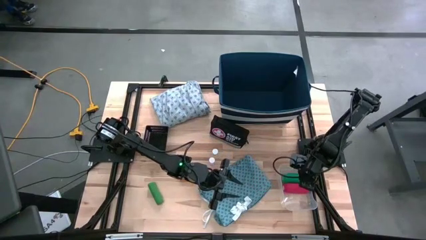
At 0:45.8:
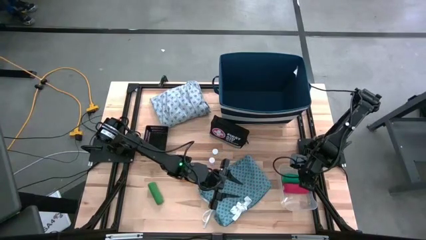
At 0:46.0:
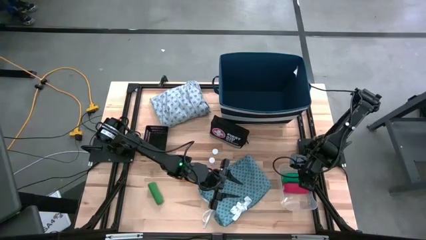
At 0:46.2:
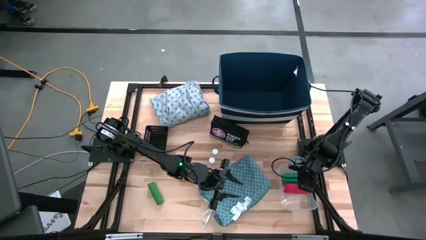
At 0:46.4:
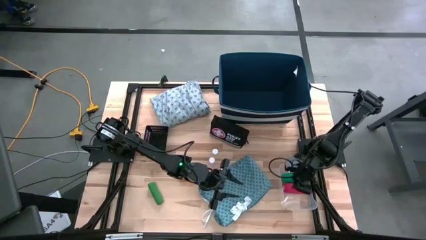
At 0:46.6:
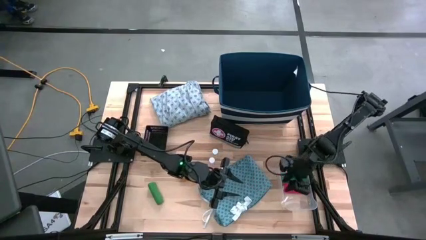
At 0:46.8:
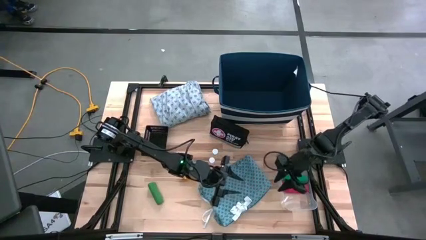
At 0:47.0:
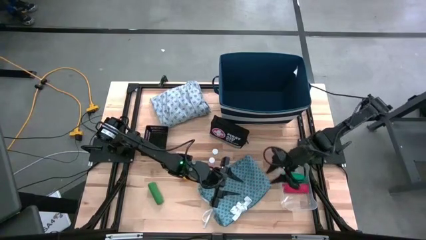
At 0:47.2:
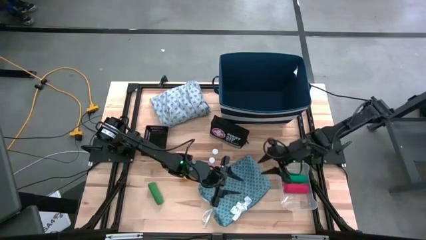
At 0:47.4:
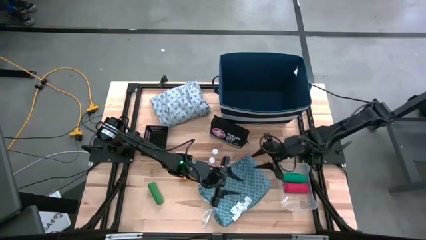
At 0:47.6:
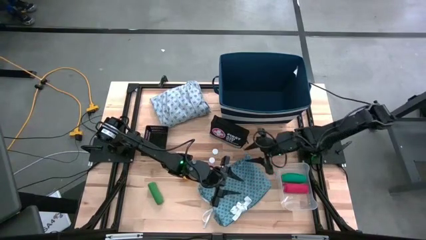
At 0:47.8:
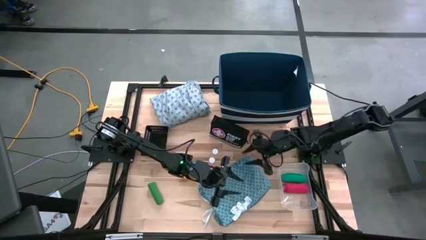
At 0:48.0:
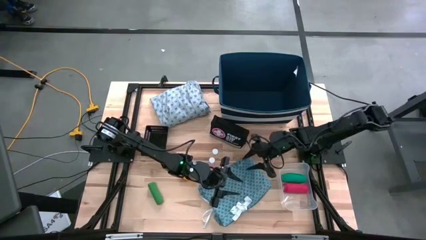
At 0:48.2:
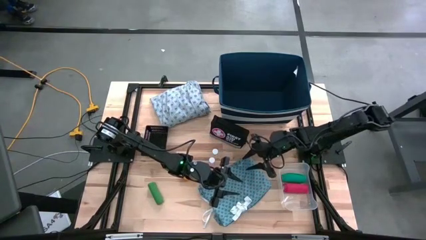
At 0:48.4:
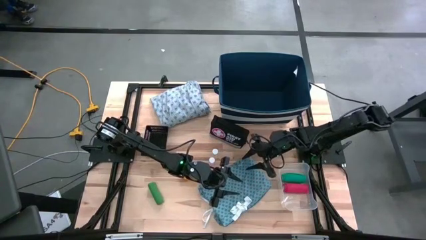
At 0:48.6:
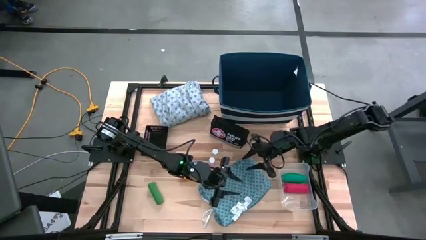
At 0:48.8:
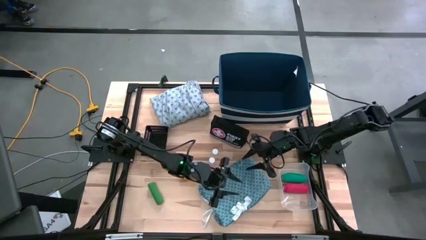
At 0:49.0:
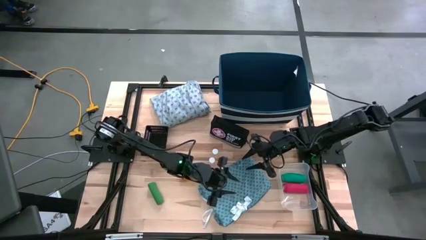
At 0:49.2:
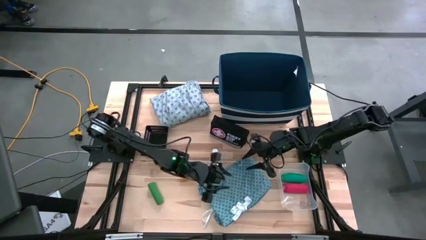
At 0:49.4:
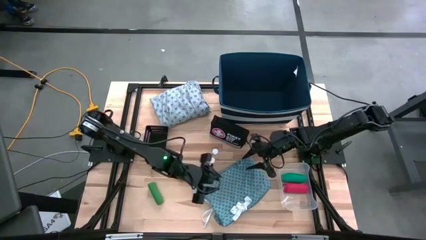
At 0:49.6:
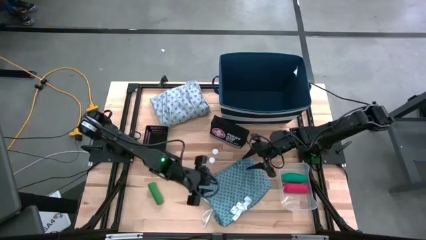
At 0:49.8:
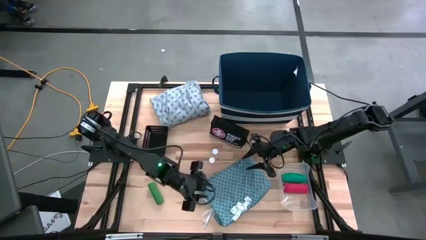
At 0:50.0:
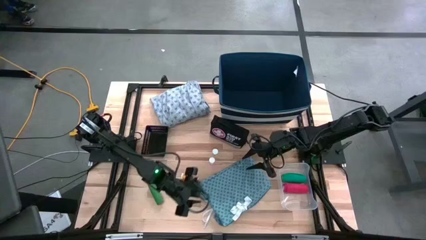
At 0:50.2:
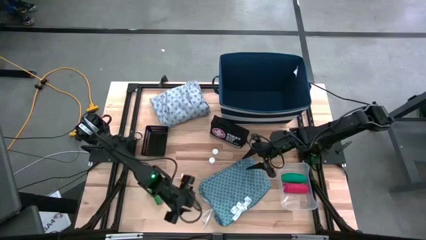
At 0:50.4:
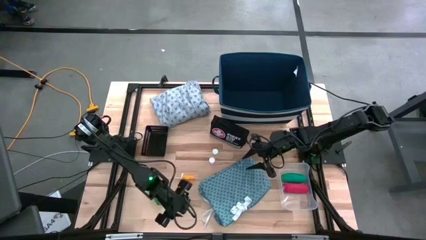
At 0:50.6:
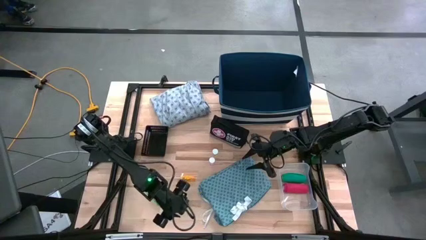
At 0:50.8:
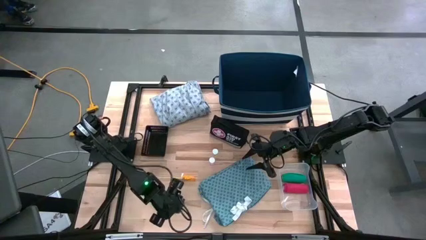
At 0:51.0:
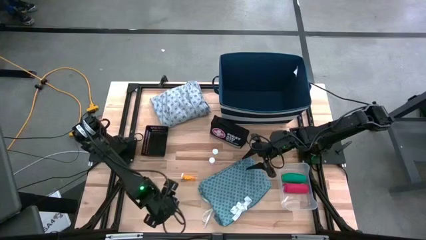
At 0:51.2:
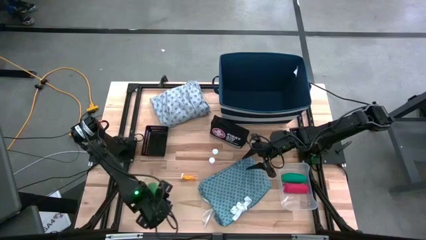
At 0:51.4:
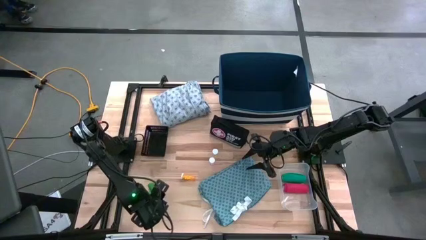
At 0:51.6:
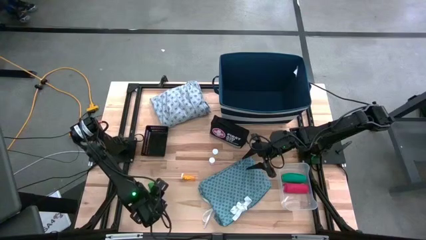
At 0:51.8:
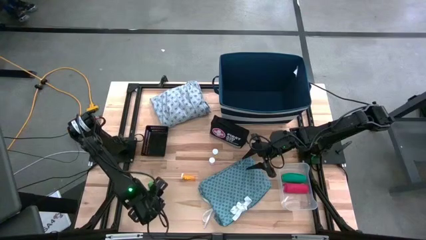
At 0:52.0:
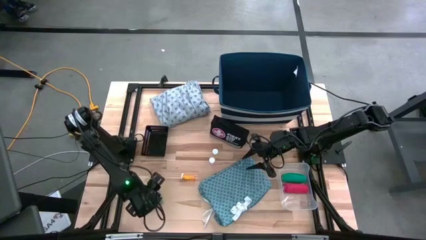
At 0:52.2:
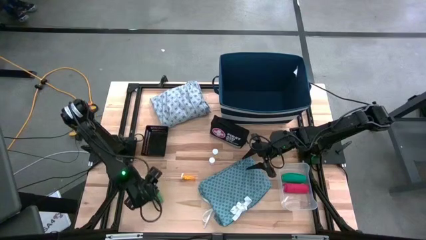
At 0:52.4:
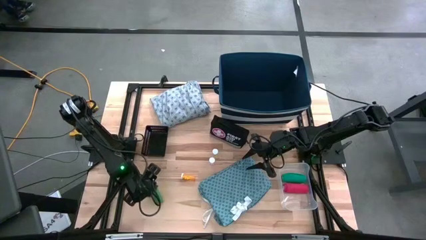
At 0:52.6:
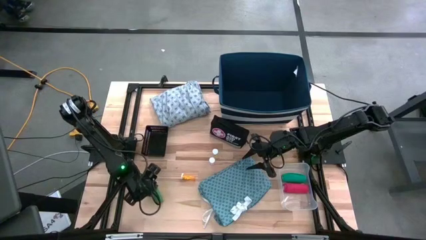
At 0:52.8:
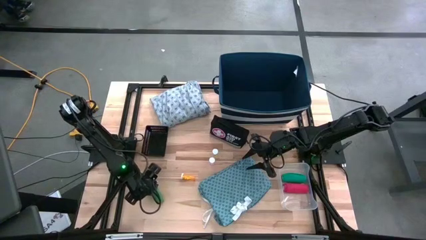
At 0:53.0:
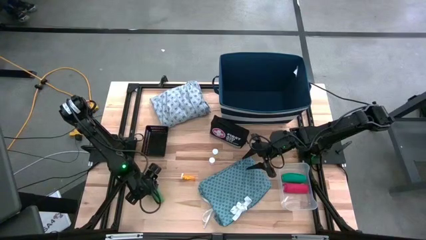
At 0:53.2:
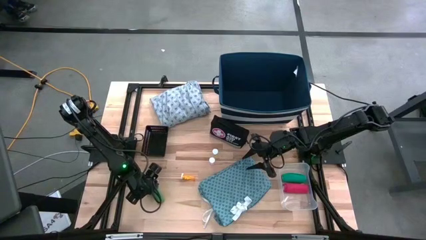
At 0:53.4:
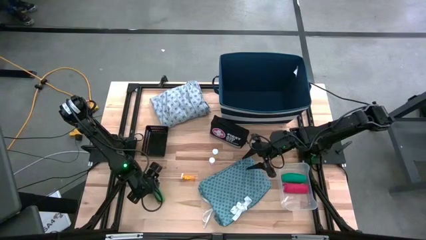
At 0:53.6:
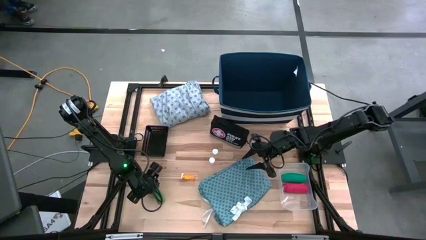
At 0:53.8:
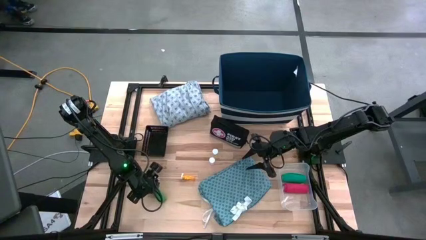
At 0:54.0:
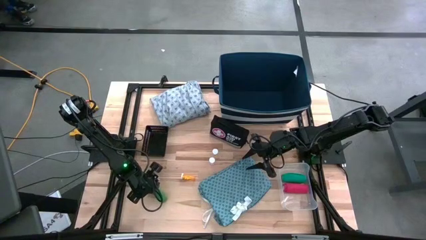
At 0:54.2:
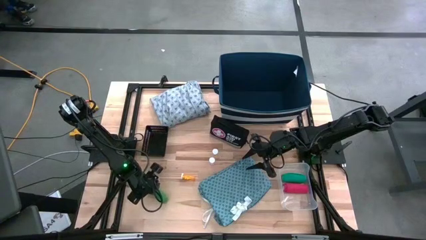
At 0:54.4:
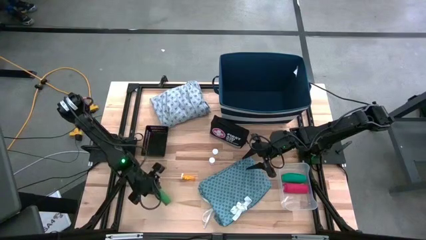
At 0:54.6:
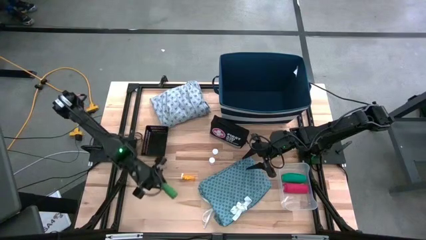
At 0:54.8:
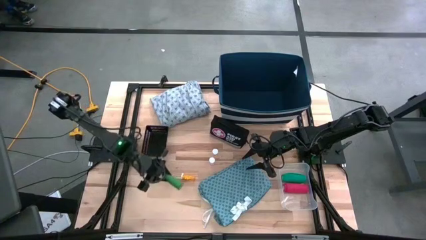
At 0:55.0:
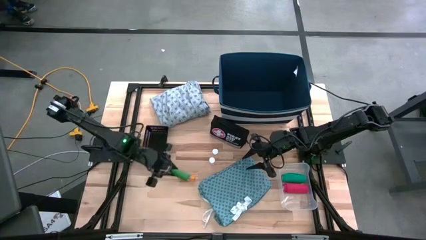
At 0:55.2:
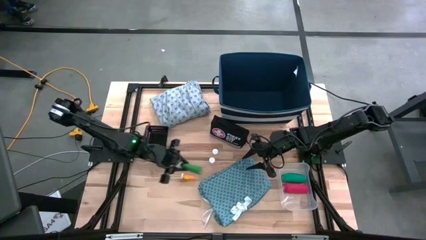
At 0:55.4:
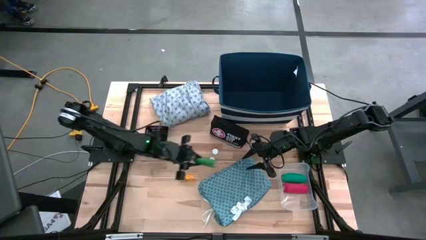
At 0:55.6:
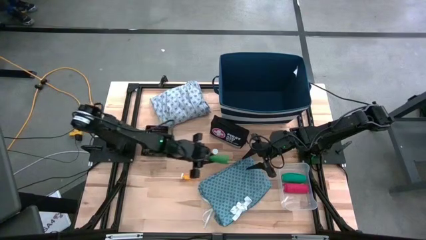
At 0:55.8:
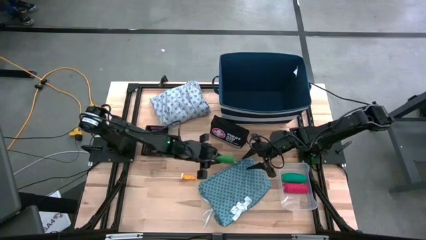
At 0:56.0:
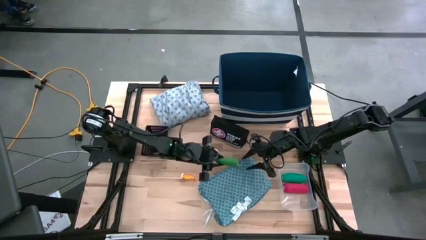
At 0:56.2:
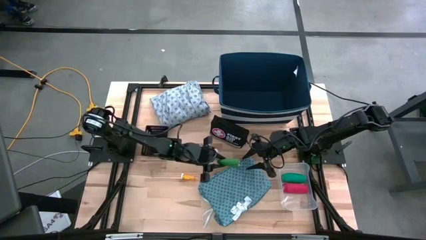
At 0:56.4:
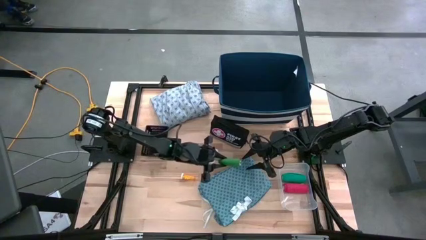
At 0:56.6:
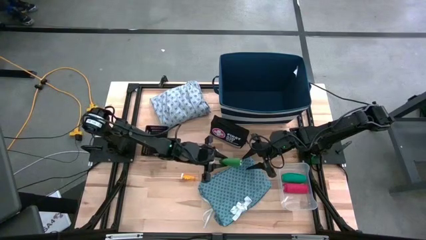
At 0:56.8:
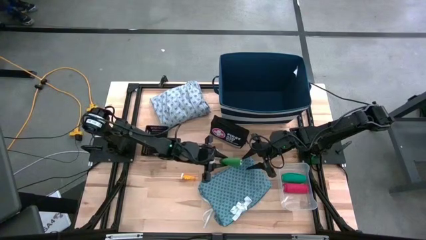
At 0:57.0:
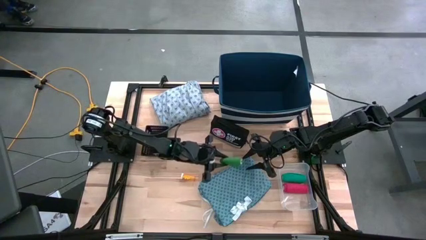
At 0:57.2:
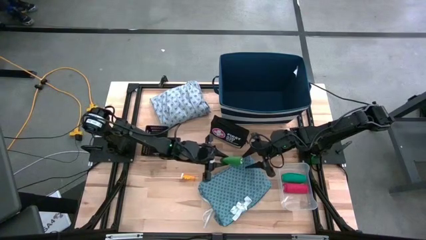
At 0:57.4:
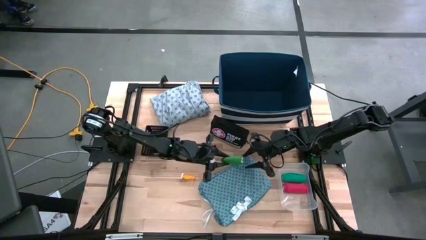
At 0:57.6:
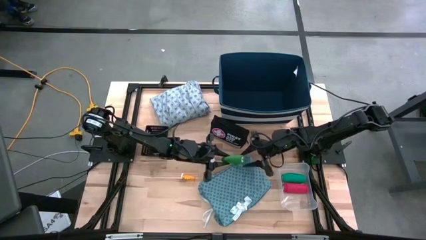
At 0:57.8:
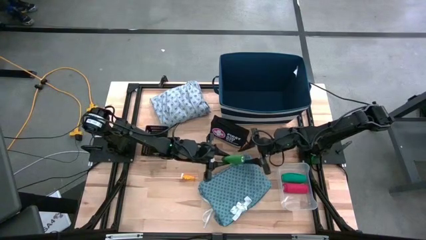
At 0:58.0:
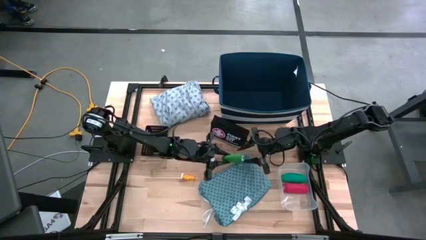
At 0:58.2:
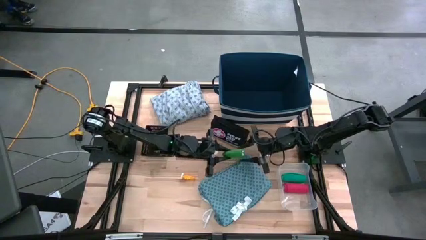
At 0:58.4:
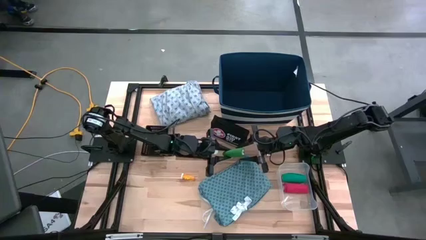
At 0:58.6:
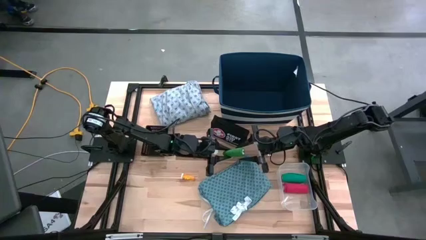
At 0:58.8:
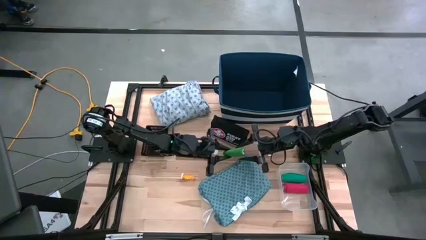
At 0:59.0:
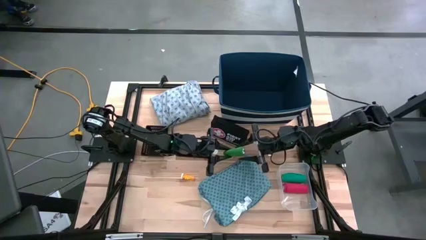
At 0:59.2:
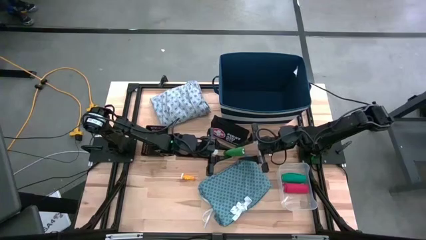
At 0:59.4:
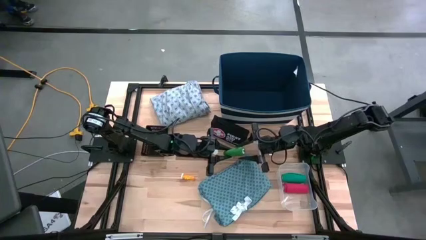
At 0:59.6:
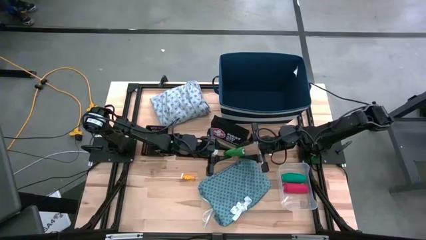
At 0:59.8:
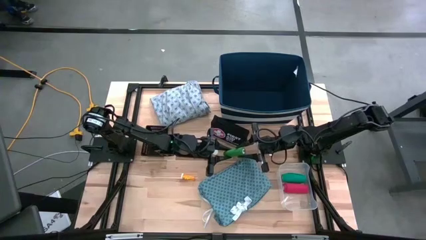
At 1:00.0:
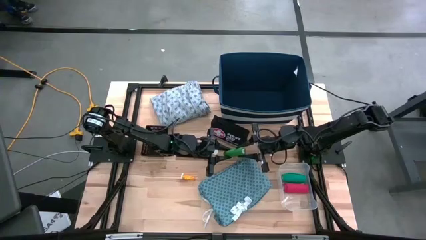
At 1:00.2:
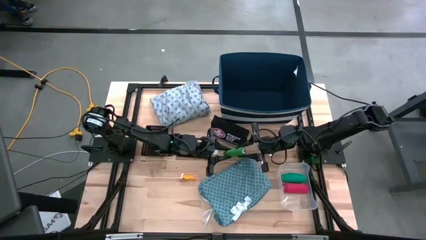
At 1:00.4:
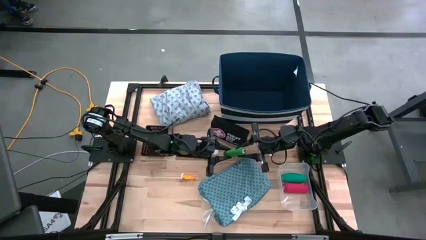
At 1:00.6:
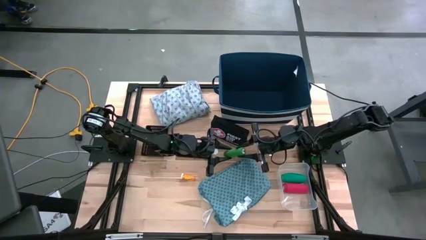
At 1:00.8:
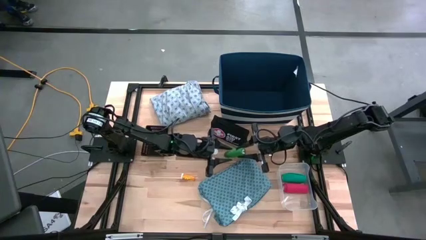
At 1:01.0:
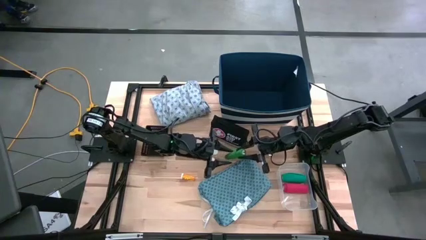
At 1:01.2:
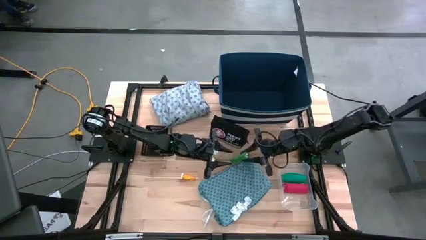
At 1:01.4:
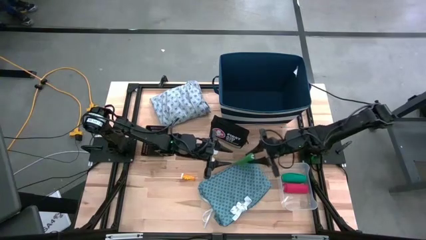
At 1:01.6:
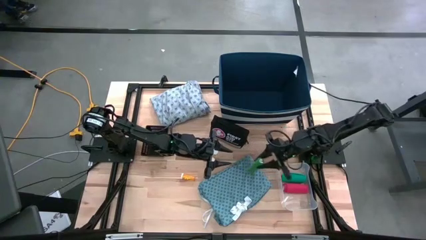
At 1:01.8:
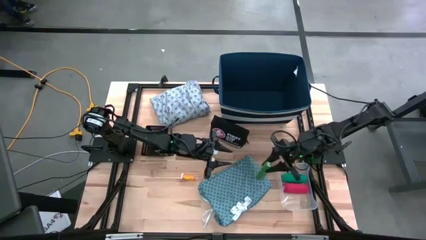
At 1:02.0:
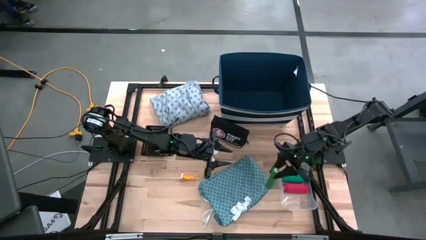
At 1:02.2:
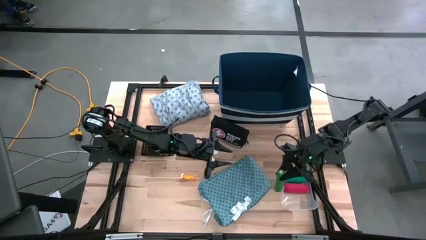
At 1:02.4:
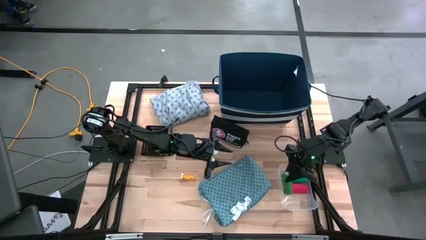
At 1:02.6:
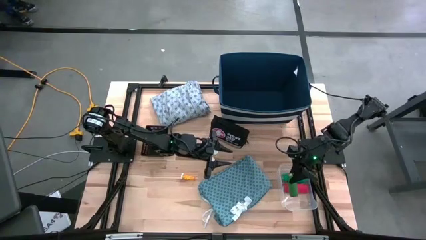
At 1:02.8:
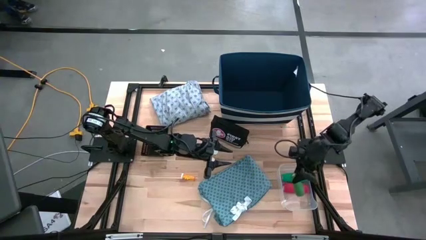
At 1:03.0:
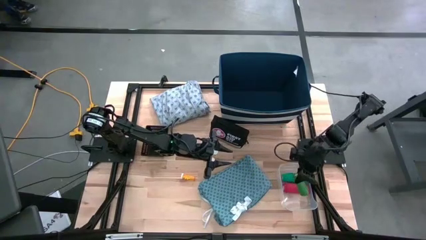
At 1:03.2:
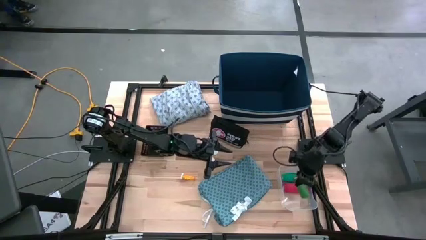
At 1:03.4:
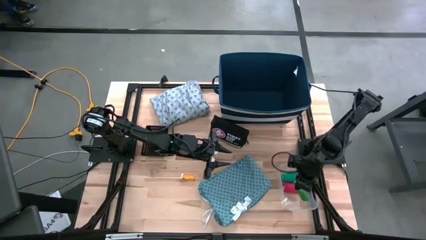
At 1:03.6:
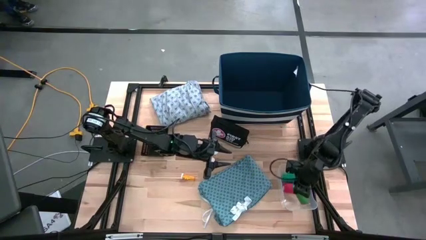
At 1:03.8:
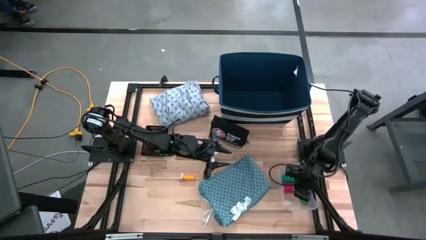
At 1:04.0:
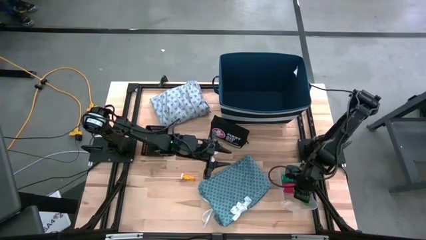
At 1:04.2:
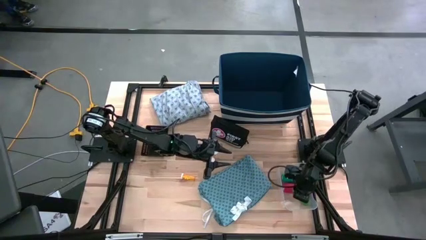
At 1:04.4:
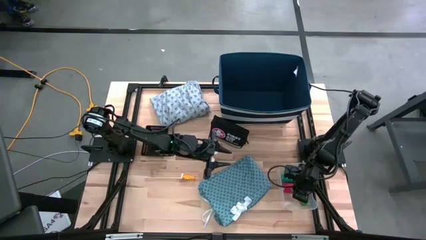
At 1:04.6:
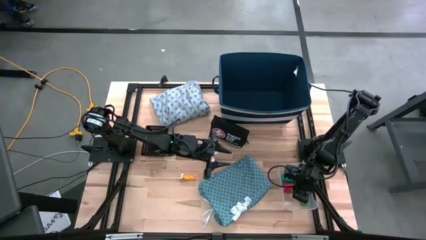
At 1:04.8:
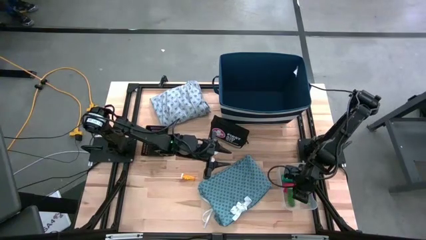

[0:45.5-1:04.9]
Task: Pick & place medical supplies in basket/bin
Put the green bandage into the transparent bin
